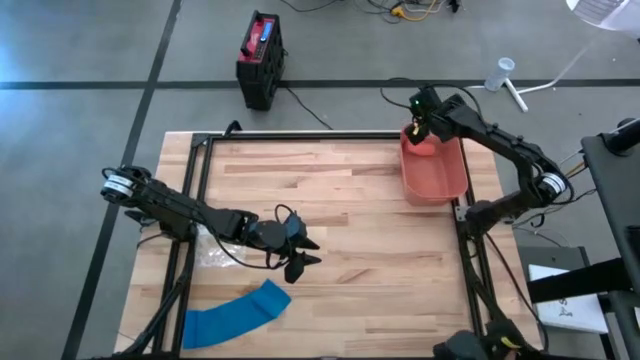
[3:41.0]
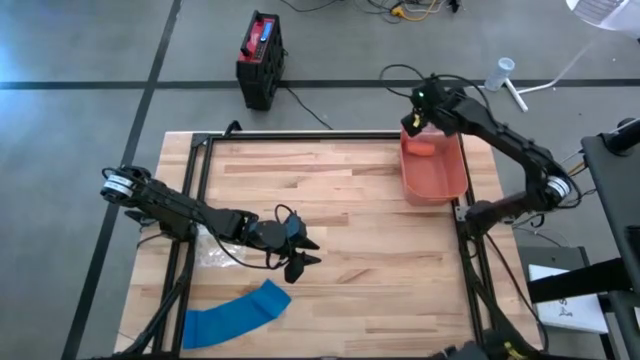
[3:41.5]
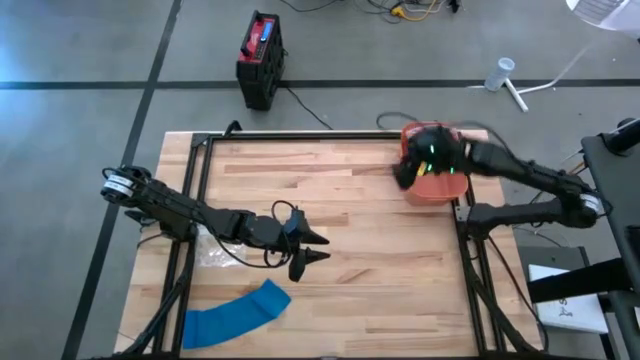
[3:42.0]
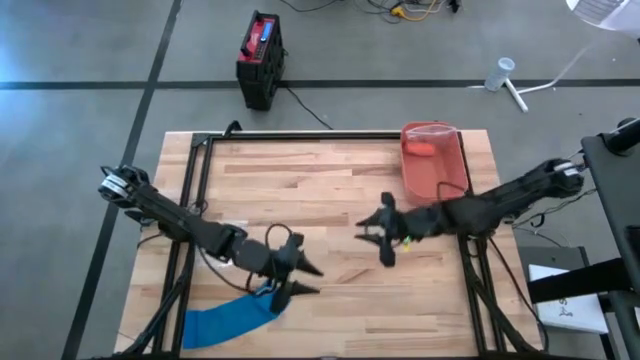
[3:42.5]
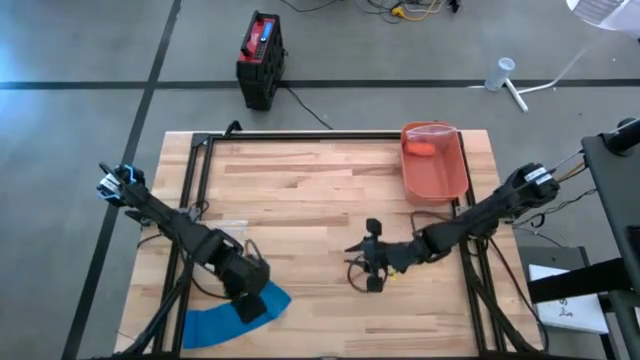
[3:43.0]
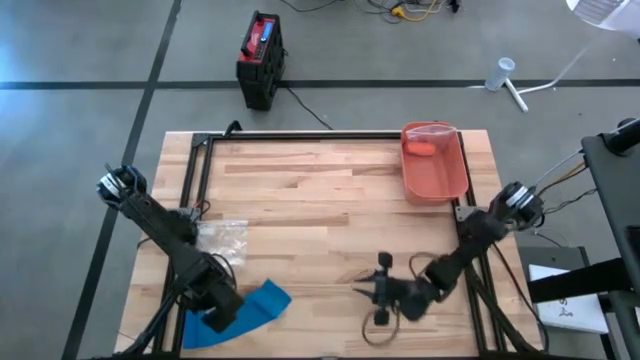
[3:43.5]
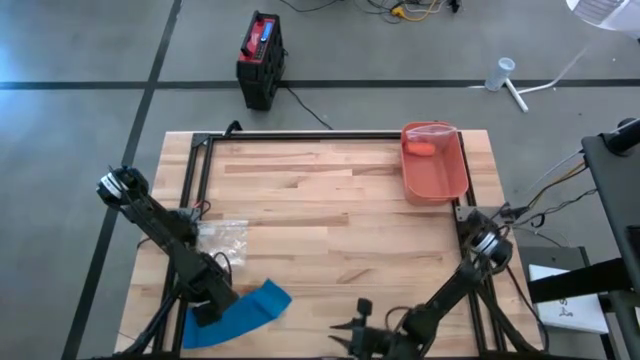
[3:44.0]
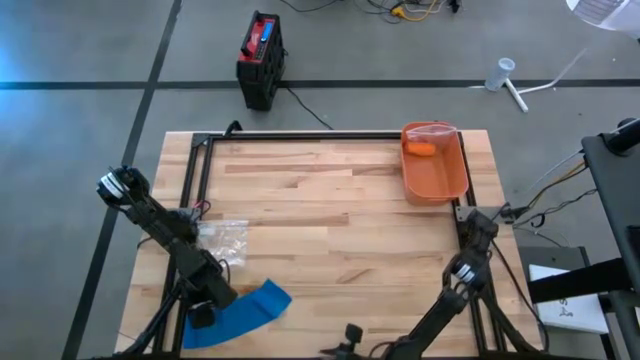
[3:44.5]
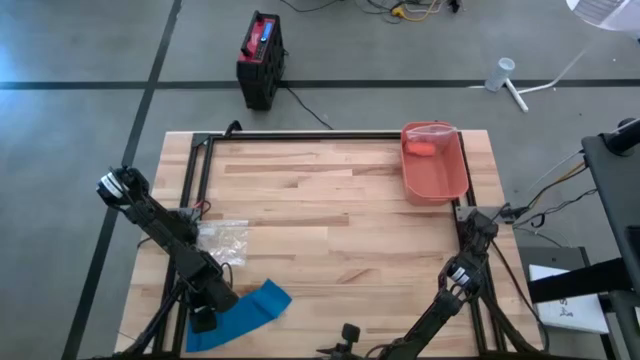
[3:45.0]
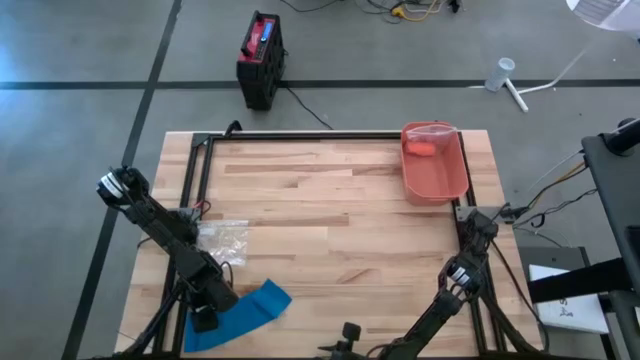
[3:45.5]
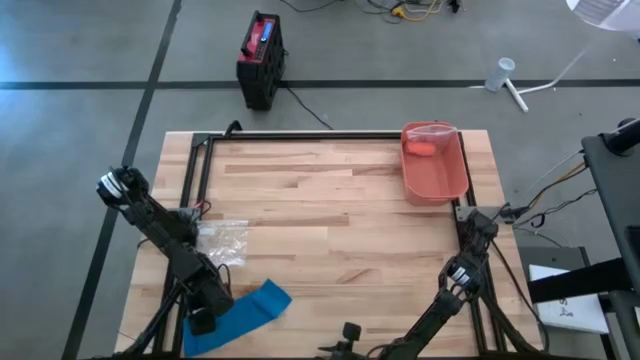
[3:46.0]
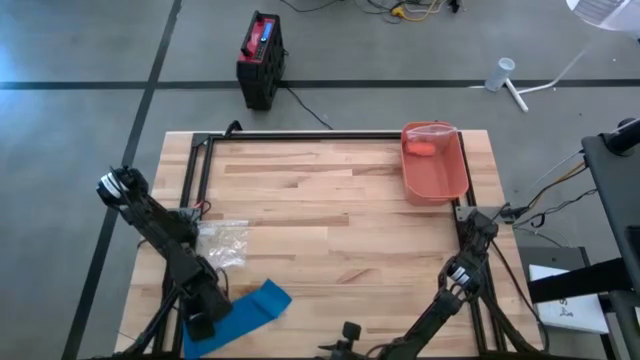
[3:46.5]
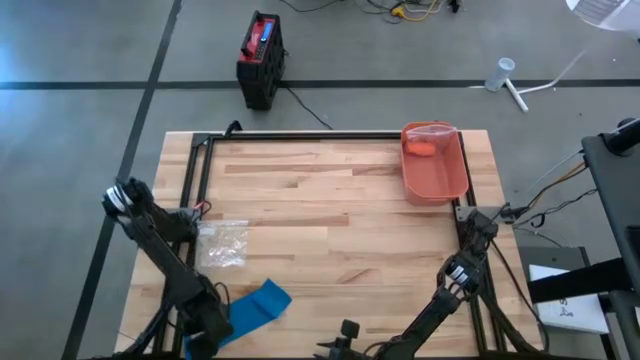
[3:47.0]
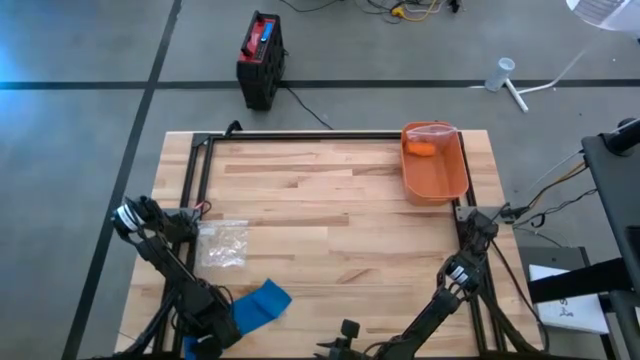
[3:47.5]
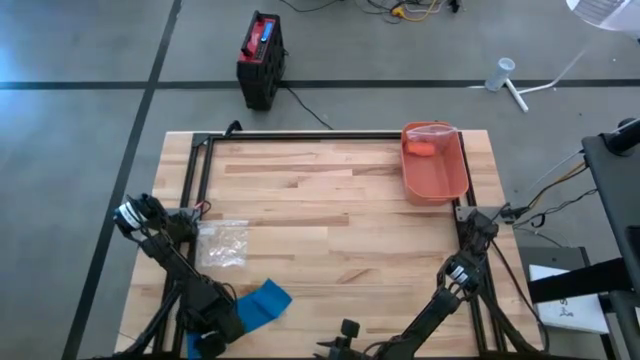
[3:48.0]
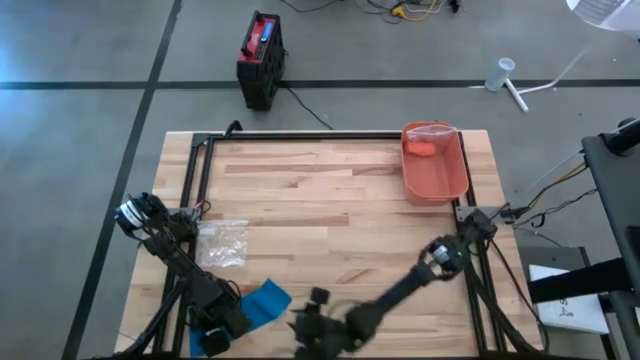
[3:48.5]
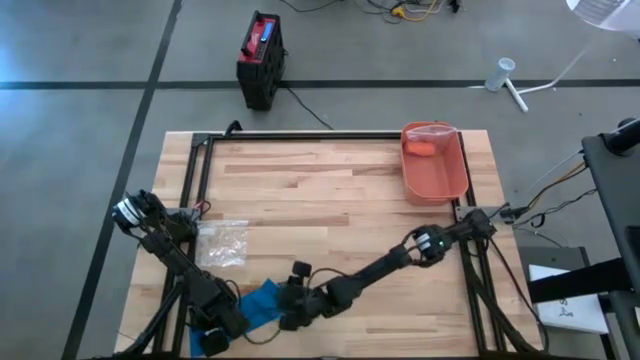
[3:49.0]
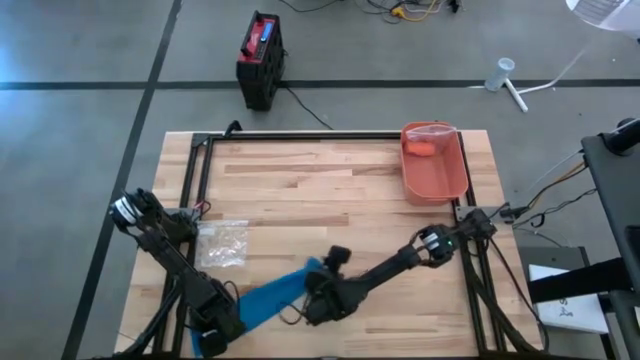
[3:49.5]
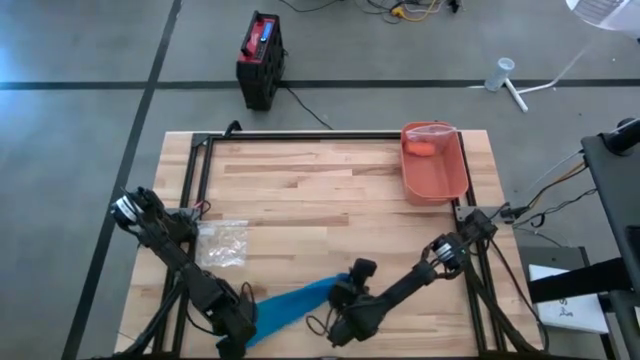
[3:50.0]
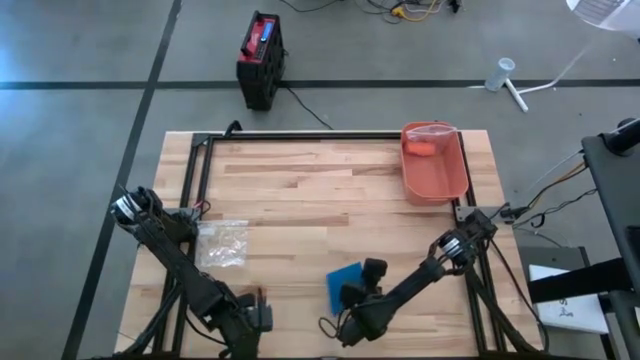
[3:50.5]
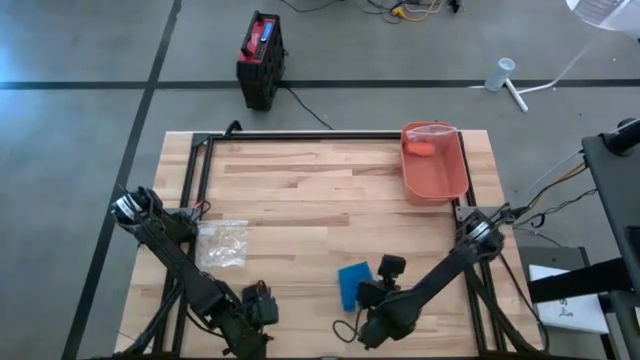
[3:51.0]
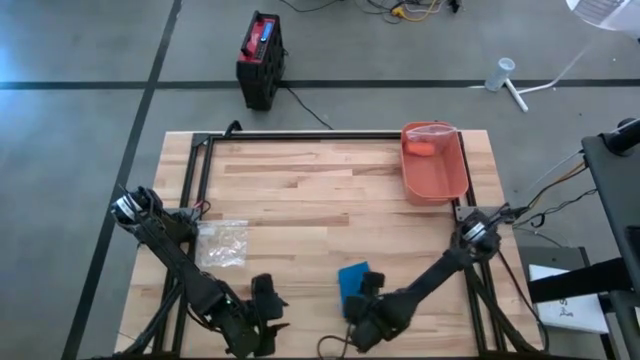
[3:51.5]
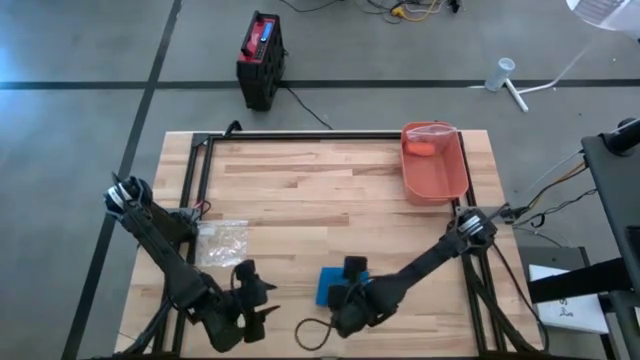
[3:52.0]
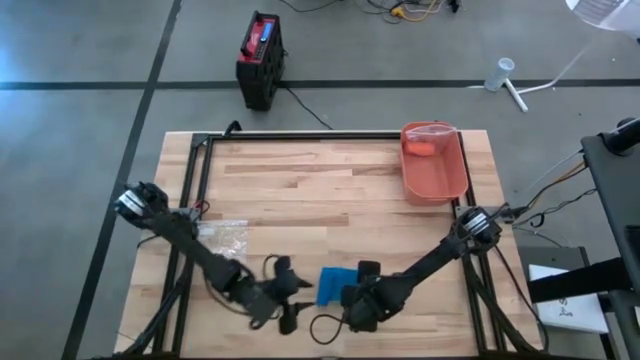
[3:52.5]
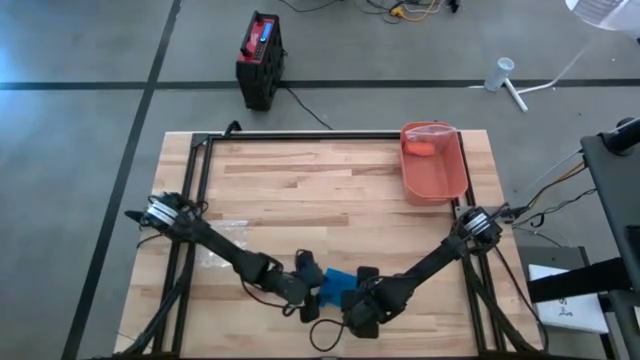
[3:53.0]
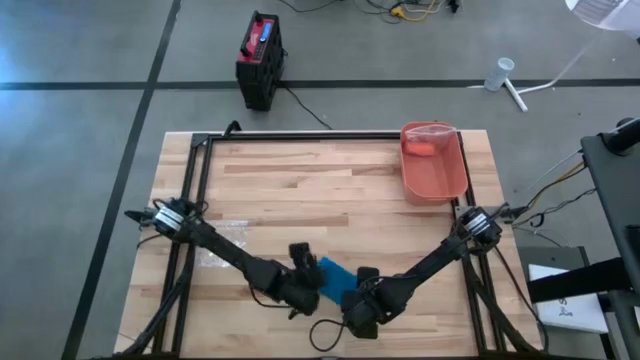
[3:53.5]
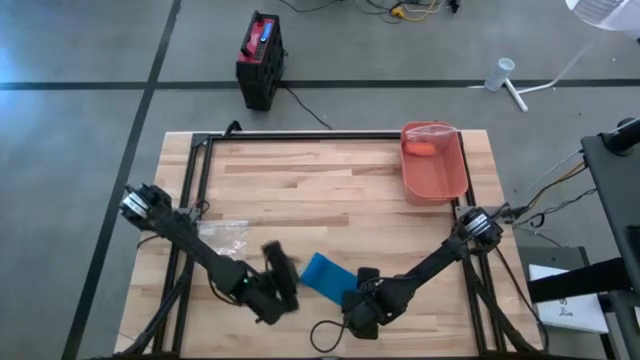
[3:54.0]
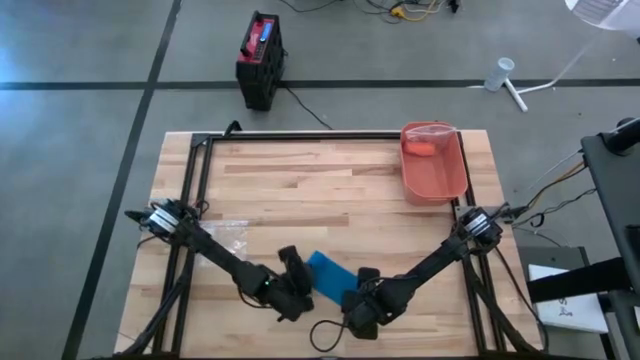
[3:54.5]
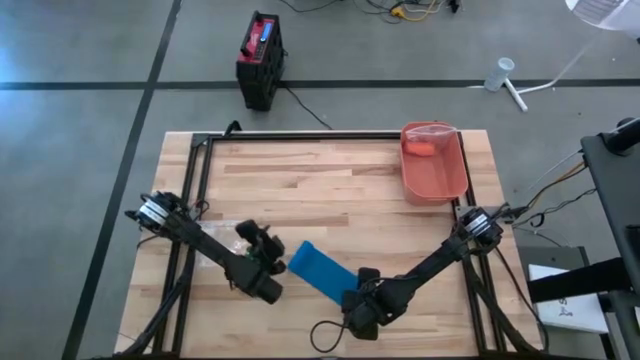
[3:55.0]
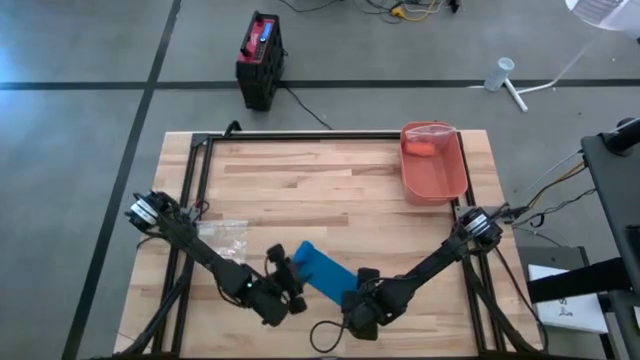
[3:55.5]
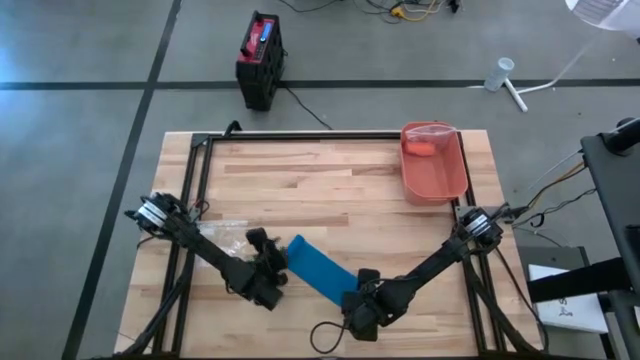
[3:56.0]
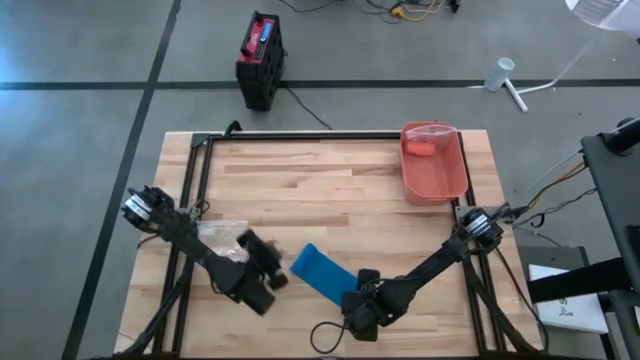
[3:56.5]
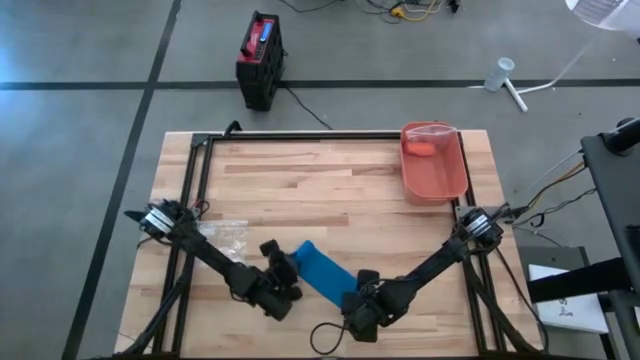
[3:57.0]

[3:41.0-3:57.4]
Task: Roll bandage
Roll the blue bandage

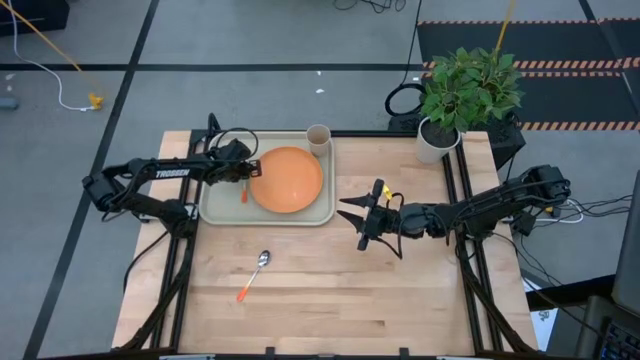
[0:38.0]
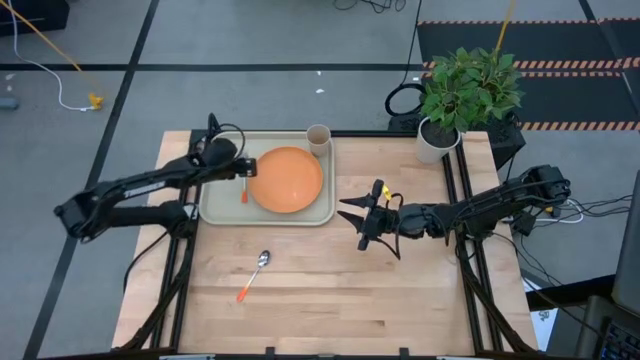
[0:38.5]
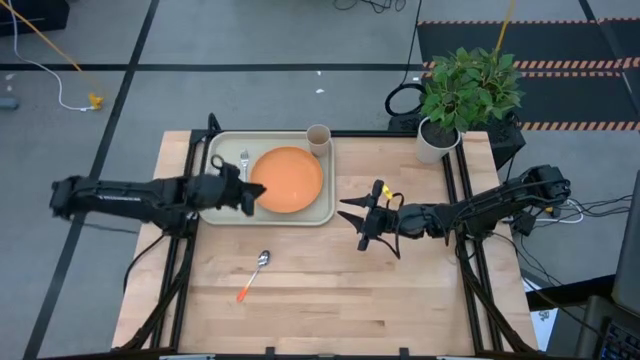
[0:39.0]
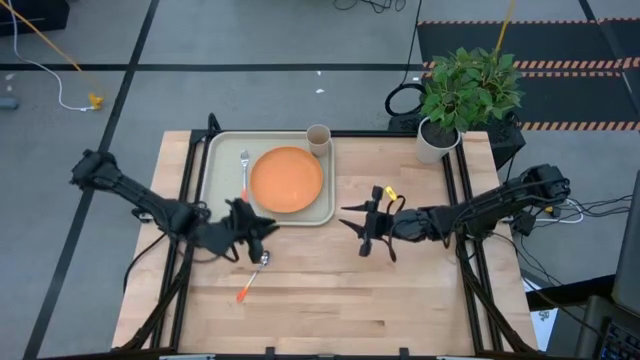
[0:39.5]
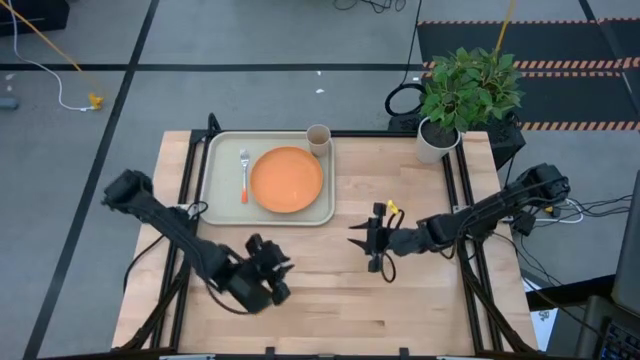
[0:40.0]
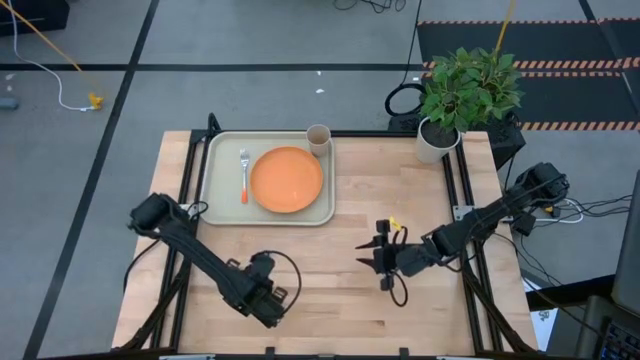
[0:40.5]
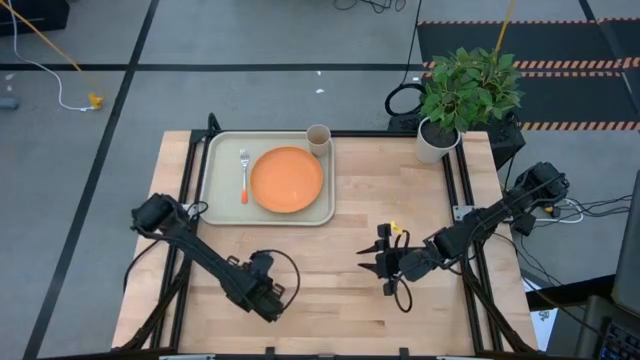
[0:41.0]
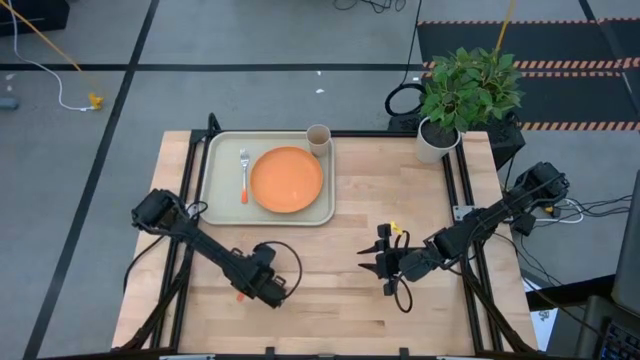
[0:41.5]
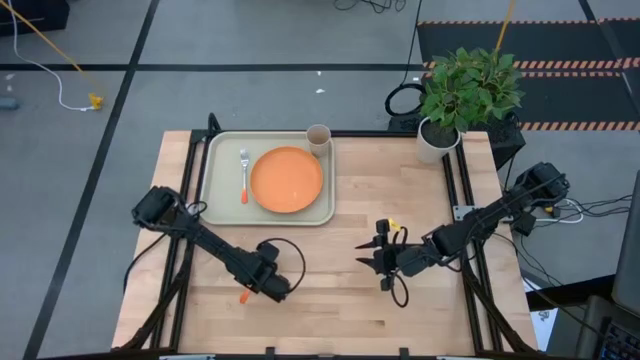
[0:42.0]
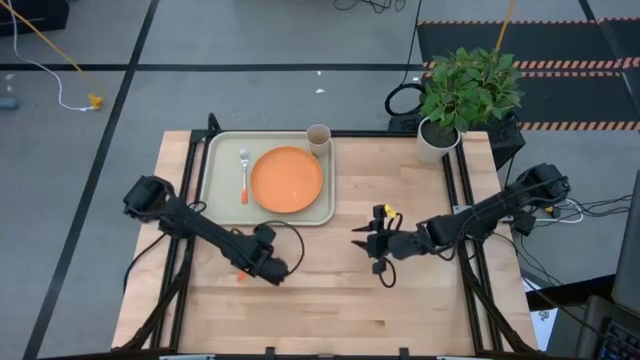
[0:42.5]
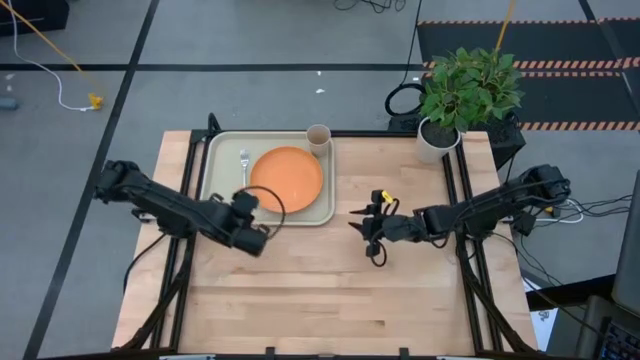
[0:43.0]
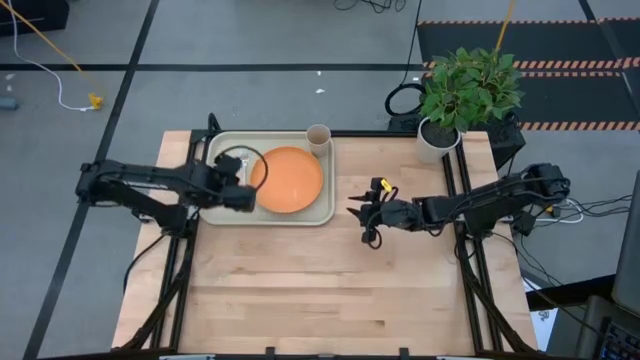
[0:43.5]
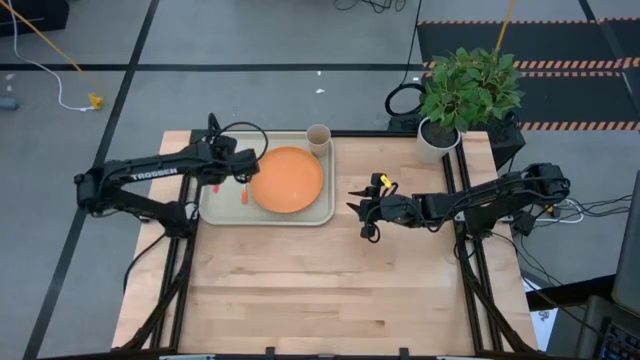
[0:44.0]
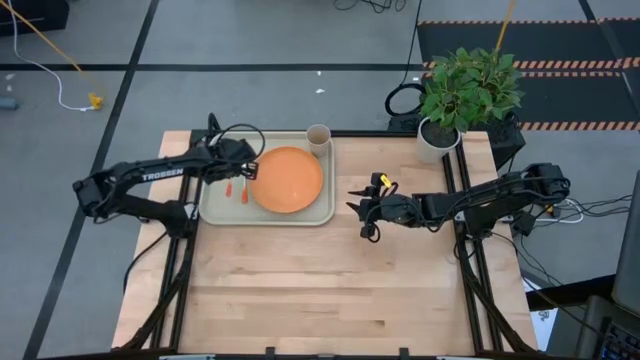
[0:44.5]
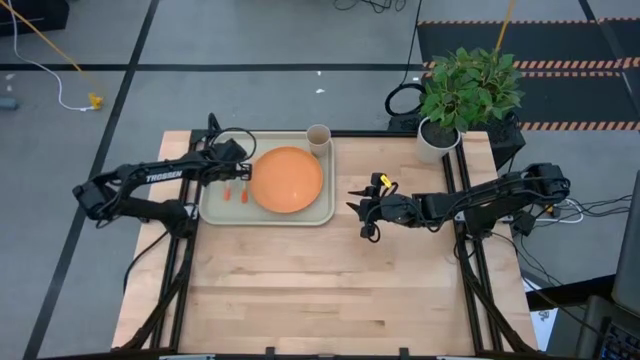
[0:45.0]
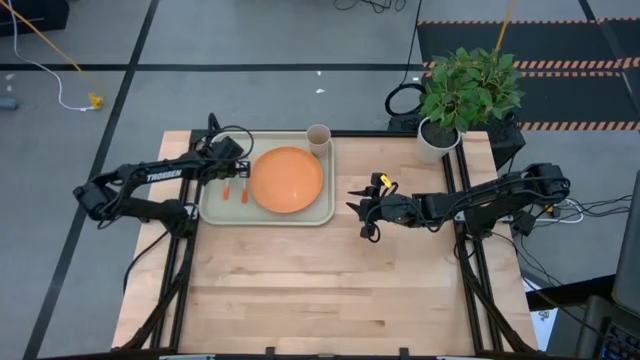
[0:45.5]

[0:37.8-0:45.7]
Task: Pick and place plate/cup/fork/spoon on tray
Put the orange spoon on the white serving tray to the left side of the orange fork
